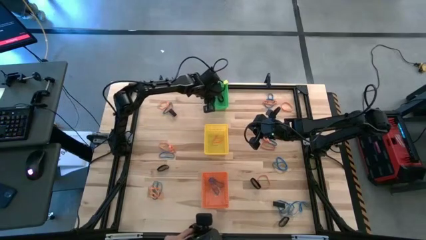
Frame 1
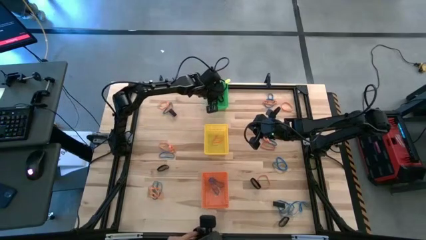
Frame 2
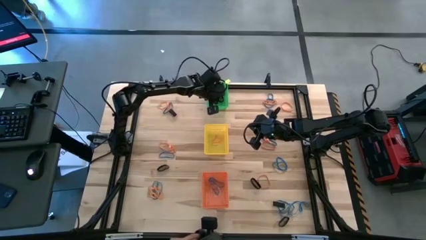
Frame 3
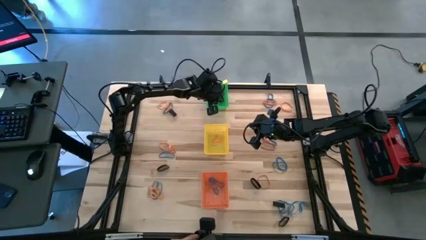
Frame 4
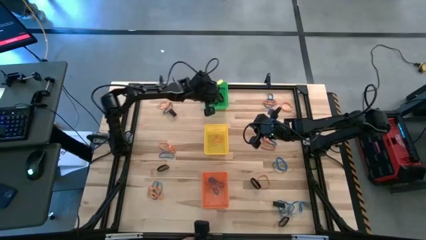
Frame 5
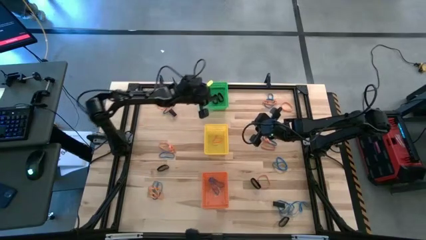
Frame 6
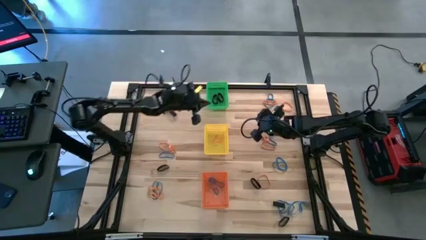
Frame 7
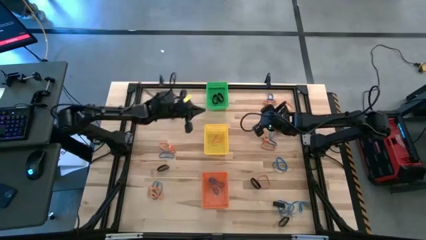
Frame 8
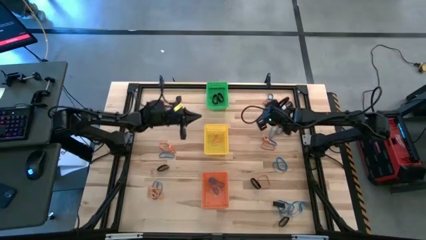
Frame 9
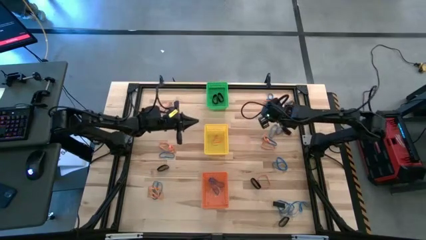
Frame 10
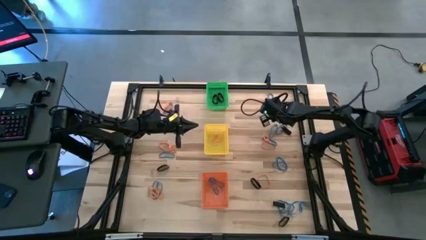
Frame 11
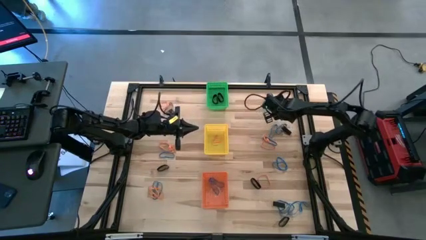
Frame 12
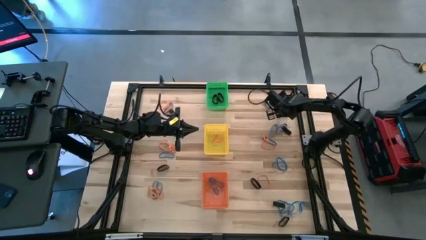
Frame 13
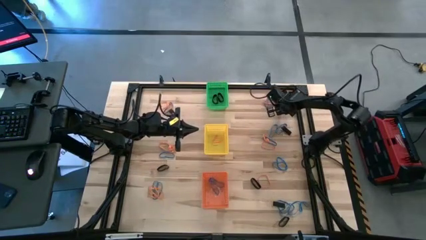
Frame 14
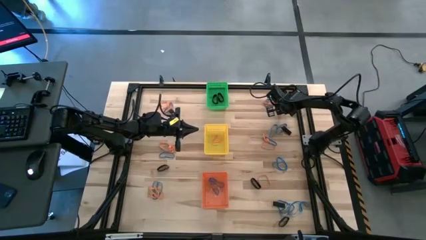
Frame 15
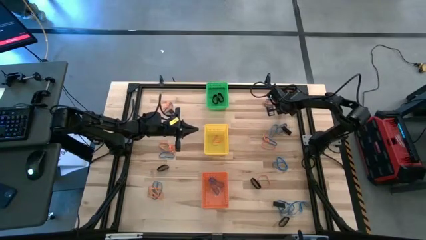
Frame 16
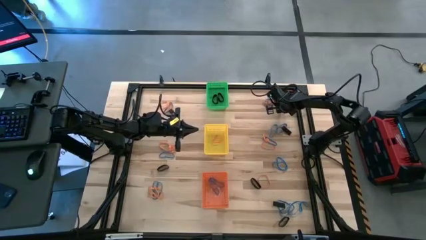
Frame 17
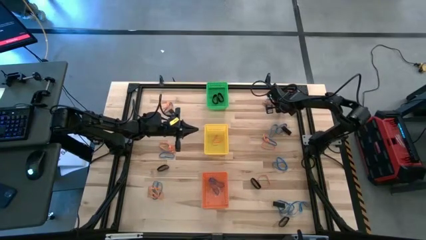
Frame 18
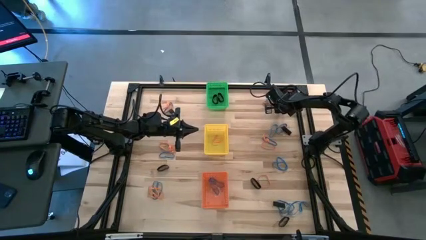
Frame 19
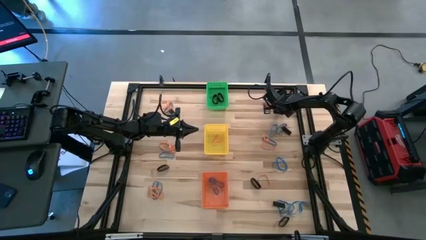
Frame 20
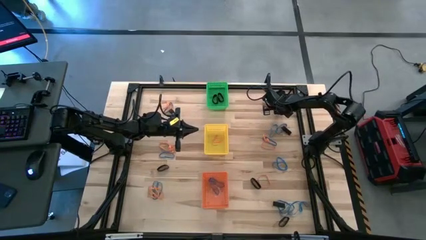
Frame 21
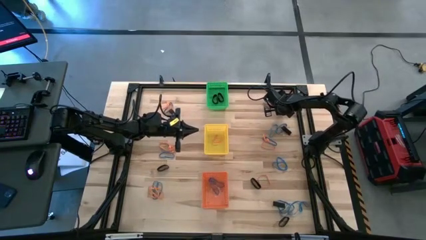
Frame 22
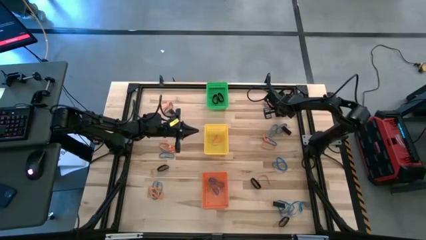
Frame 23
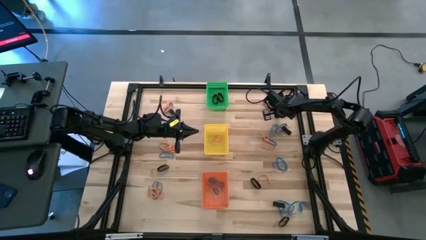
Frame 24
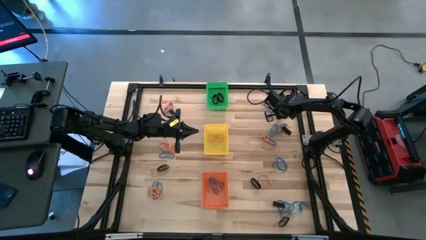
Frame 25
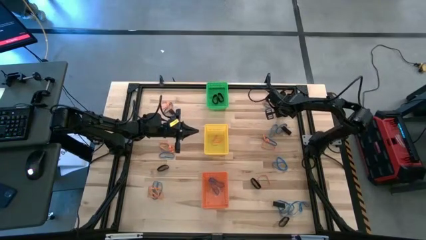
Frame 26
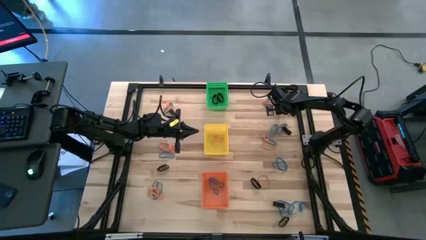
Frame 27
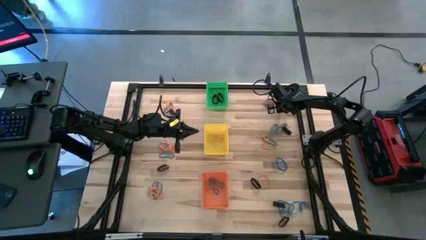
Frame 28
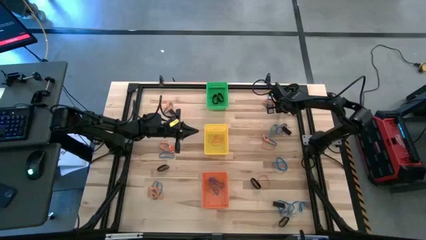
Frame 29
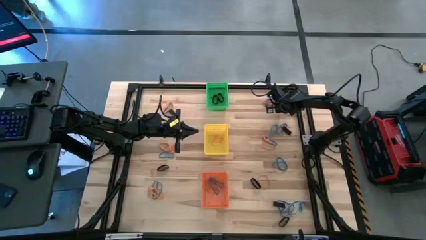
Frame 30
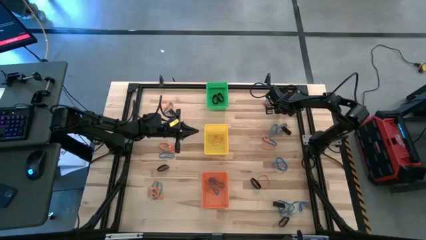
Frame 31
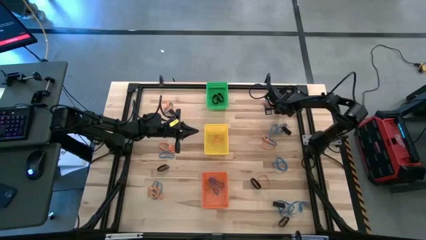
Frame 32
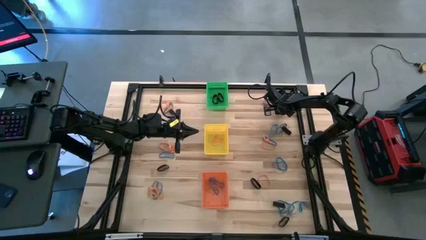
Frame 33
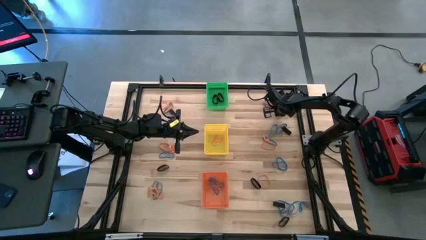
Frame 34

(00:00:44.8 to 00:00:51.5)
Task: Sort rubber bands into baskets
Put the orange rubber band into the yellow bin

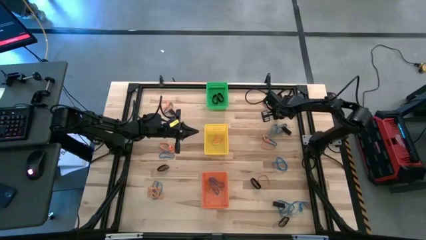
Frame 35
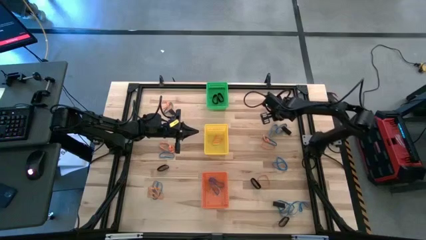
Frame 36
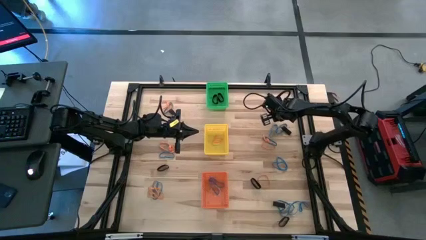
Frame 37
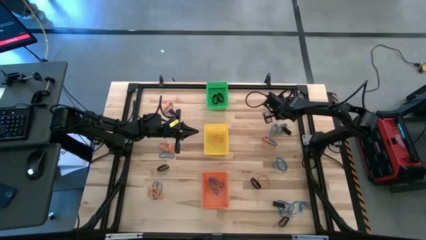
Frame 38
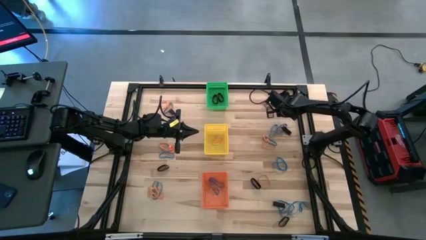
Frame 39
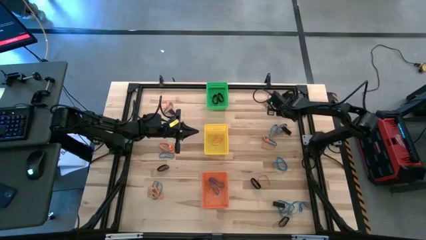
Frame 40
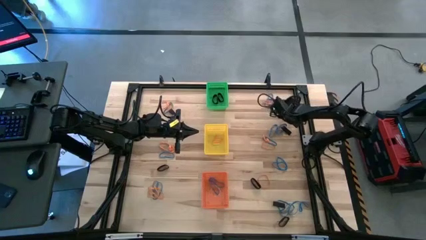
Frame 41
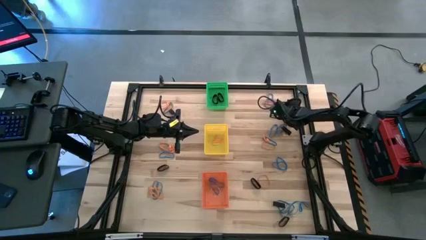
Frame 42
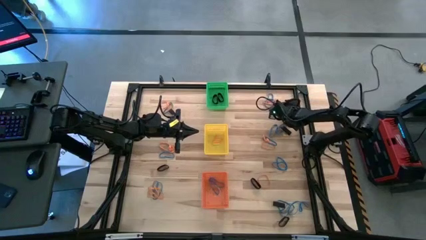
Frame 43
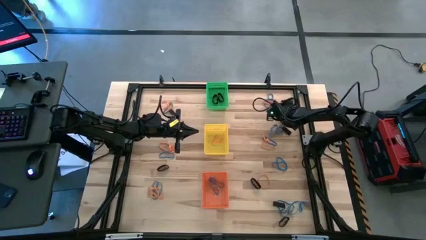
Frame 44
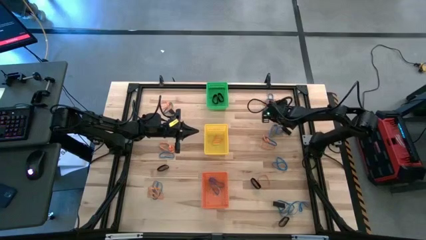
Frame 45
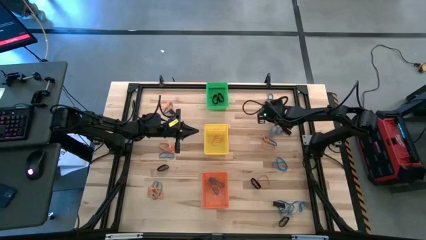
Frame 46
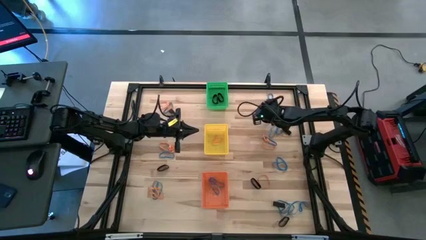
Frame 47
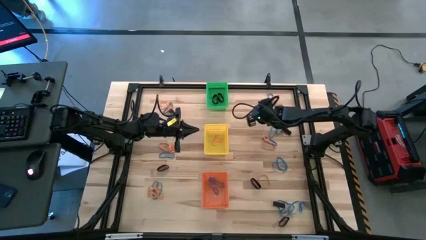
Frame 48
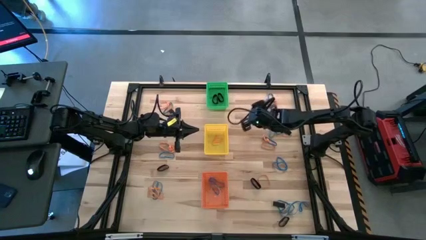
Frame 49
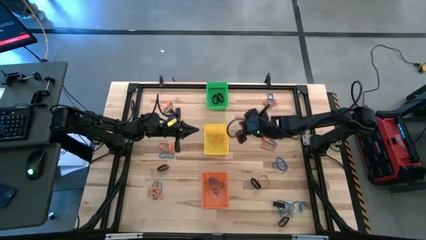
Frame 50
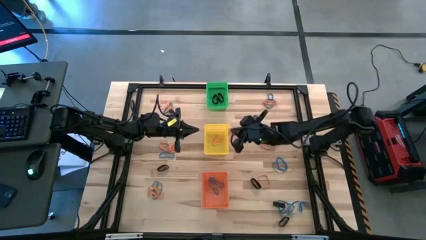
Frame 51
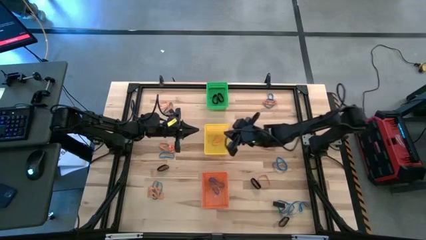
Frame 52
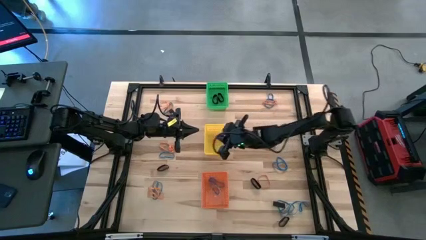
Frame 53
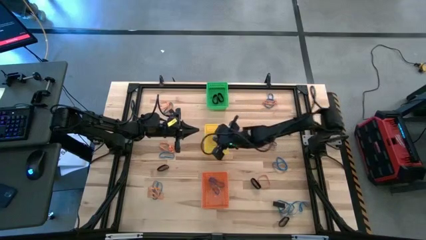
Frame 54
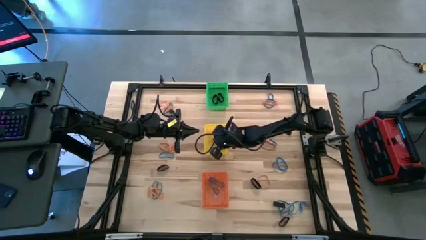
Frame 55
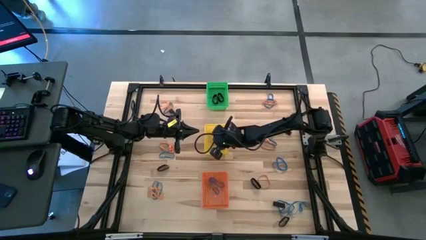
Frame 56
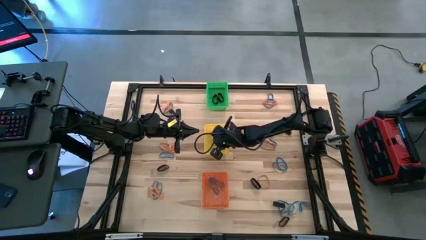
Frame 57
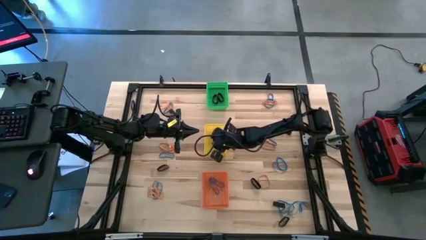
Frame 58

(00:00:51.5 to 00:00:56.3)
Put the orange rubber band into the yellow bin

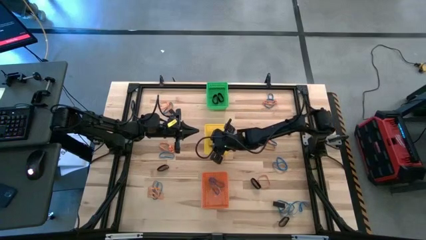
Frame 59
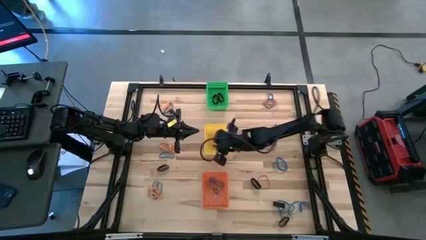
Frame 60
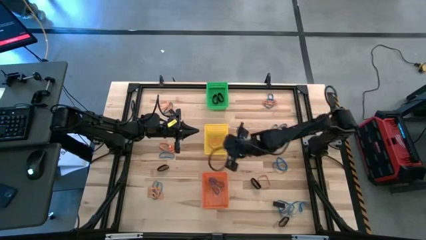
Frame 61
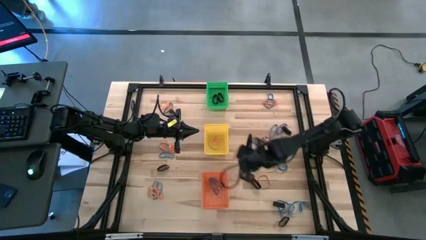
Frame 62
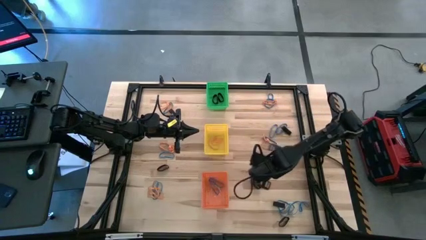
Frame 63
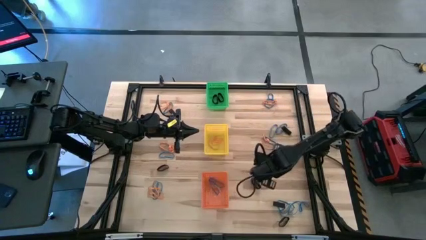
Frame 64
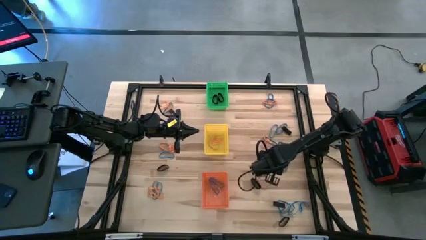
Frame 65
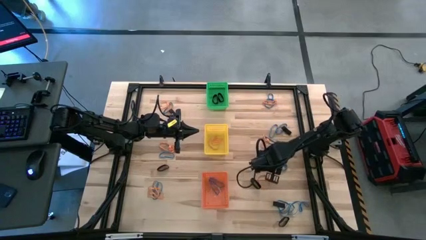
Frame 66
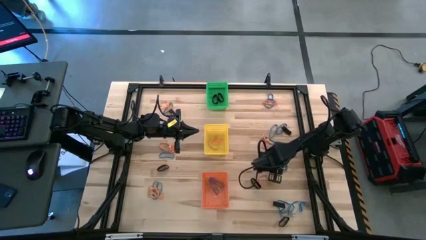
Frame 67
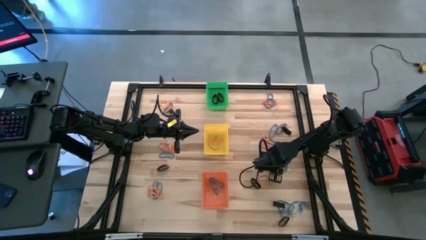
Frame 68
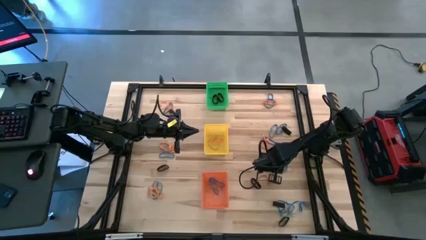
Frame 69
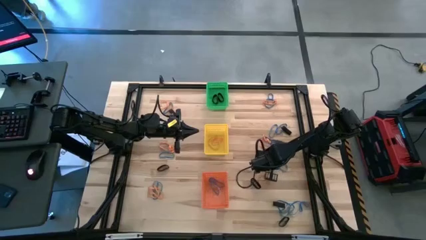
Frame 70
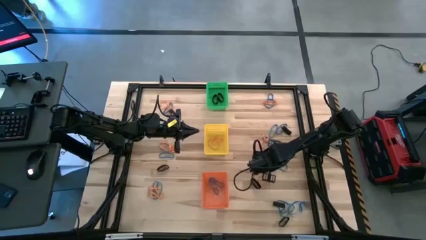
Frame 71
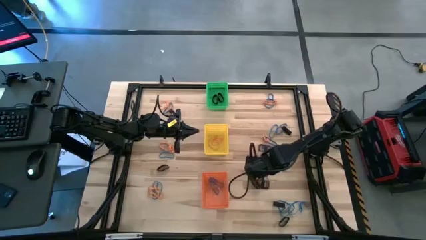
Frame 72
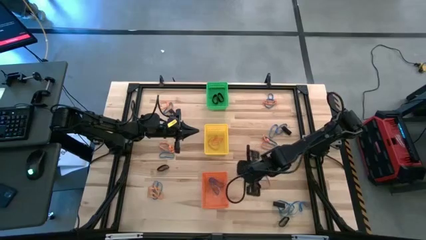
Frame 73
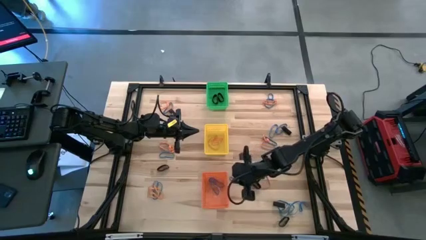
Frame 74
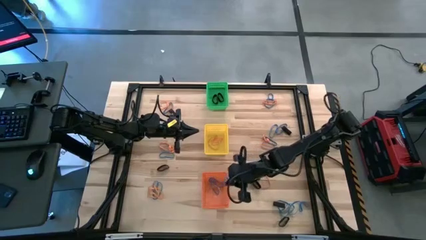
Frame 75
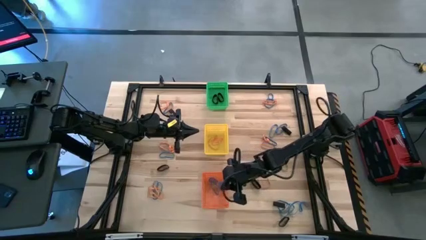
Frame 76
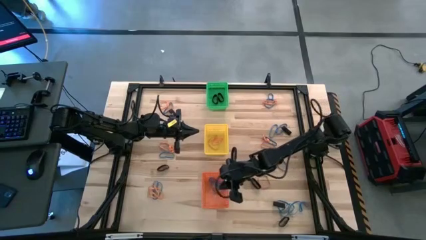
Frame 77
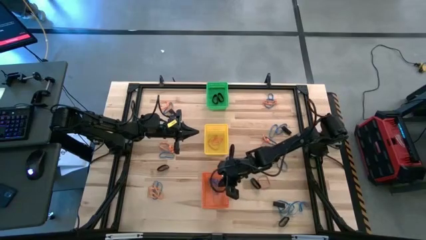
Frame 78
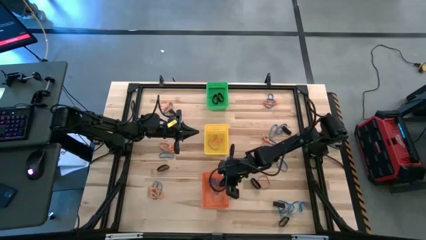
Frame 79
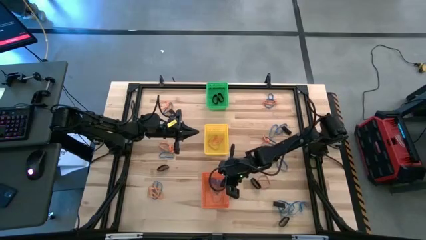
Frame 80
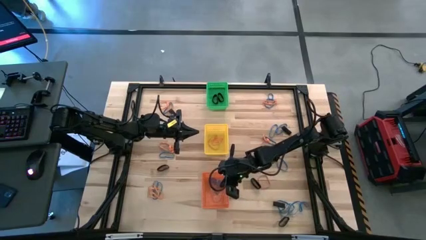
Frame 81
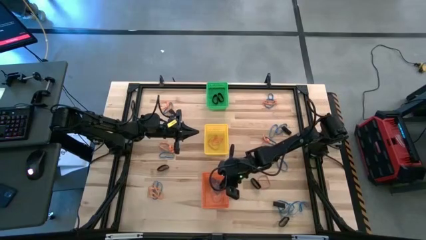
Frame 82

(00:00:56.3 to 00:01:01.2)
Put the blue rubber band into the orange bin
